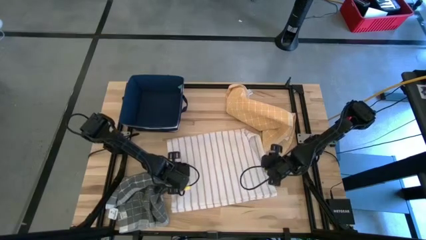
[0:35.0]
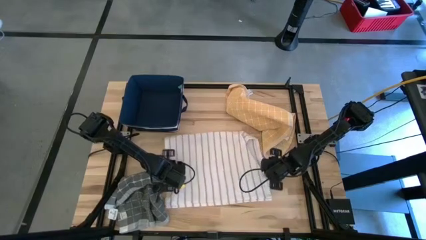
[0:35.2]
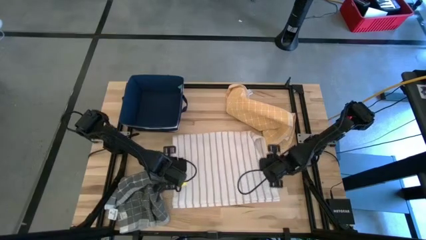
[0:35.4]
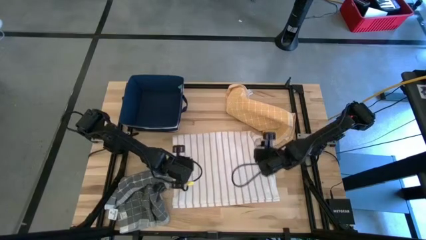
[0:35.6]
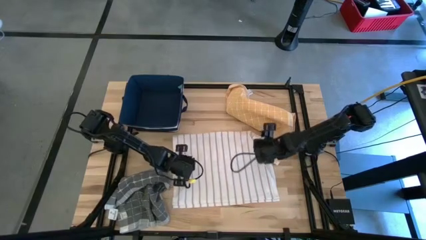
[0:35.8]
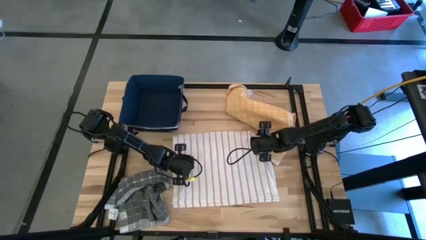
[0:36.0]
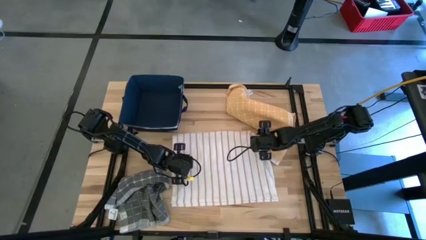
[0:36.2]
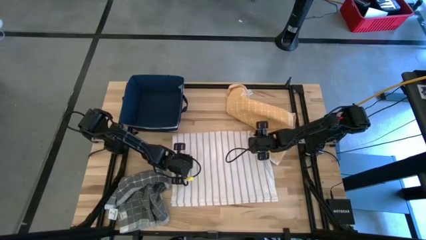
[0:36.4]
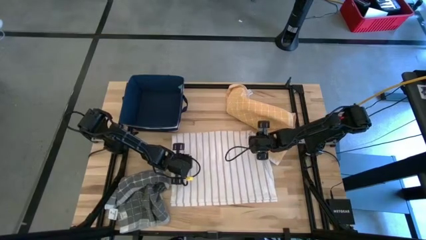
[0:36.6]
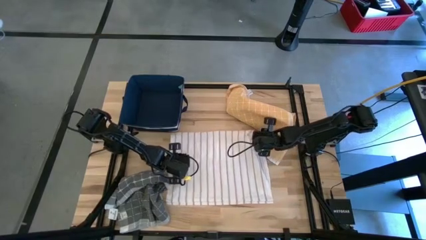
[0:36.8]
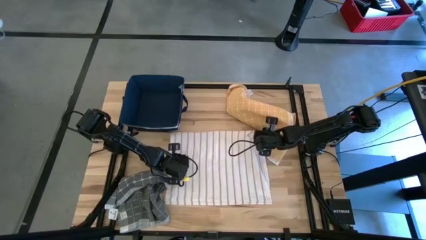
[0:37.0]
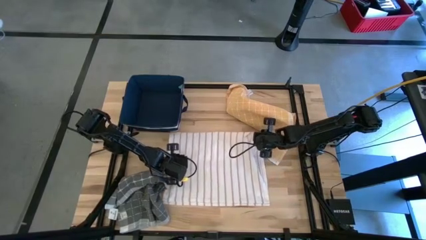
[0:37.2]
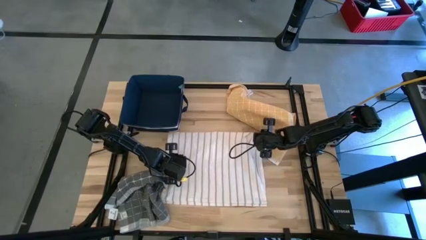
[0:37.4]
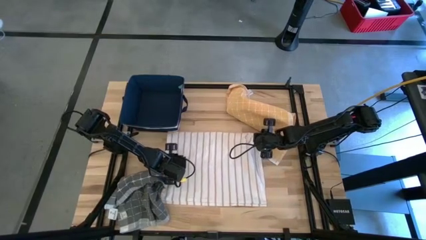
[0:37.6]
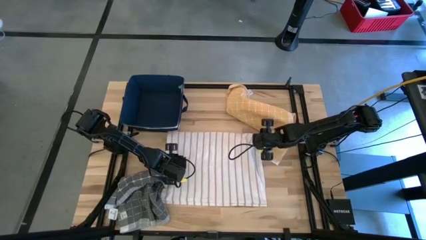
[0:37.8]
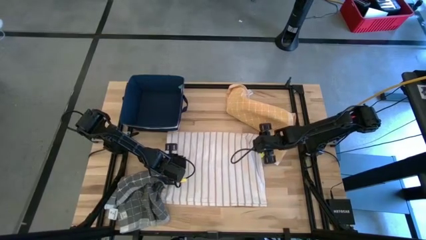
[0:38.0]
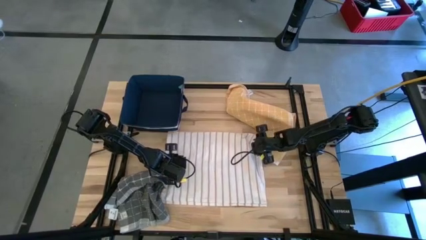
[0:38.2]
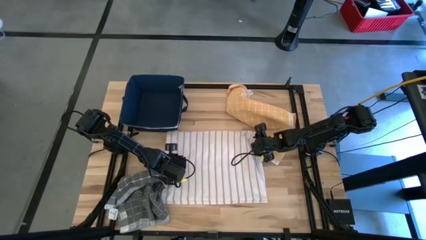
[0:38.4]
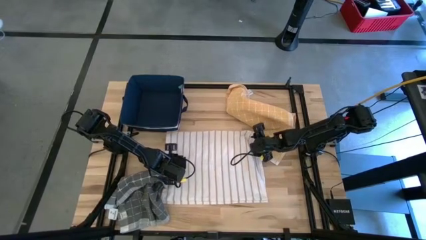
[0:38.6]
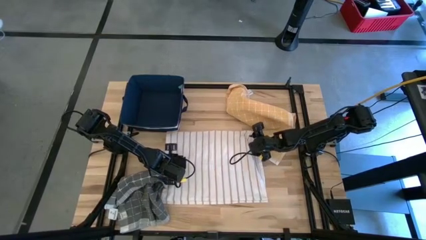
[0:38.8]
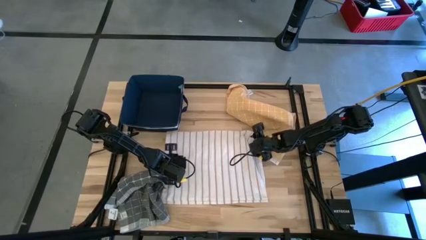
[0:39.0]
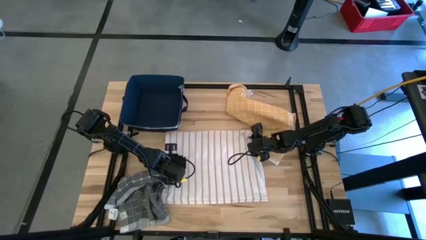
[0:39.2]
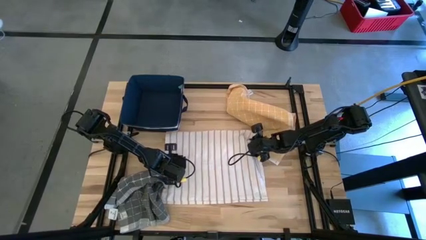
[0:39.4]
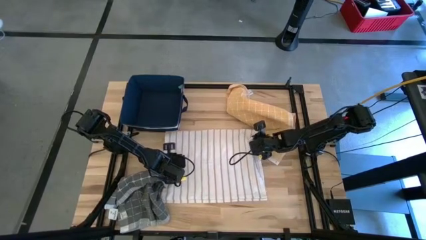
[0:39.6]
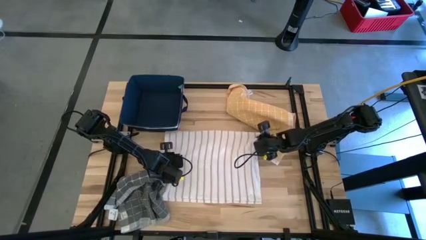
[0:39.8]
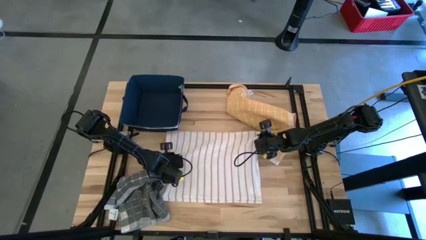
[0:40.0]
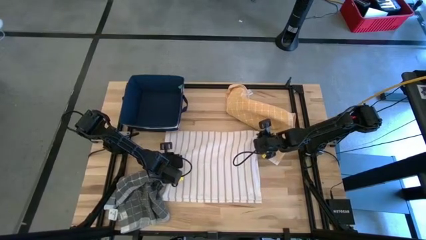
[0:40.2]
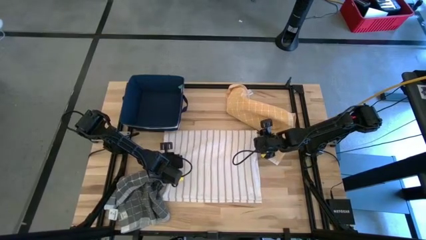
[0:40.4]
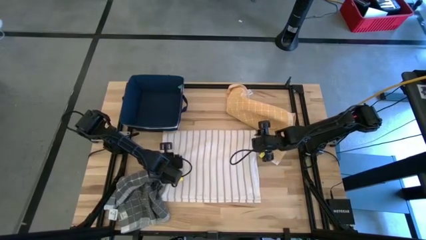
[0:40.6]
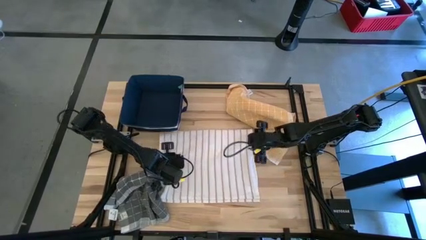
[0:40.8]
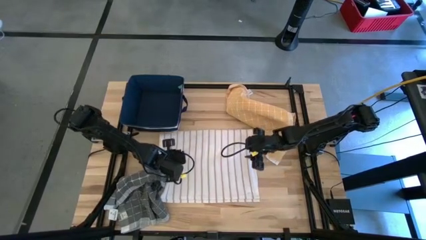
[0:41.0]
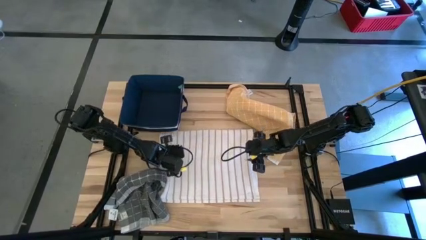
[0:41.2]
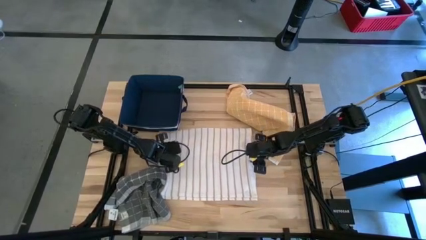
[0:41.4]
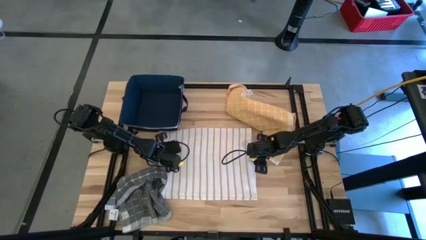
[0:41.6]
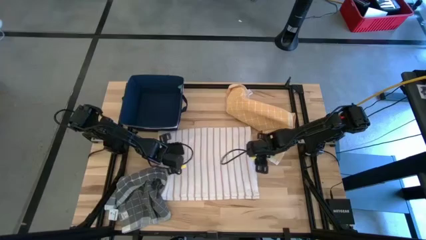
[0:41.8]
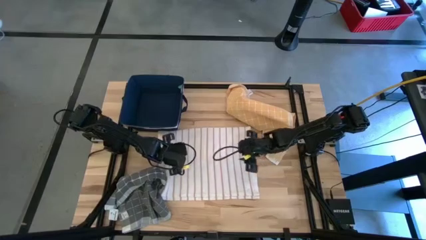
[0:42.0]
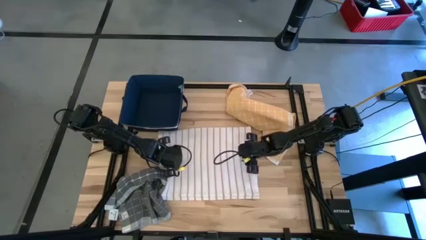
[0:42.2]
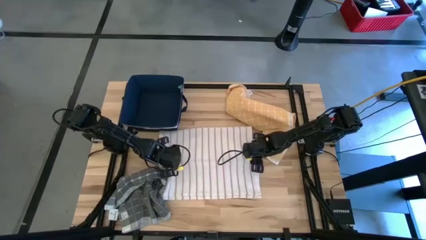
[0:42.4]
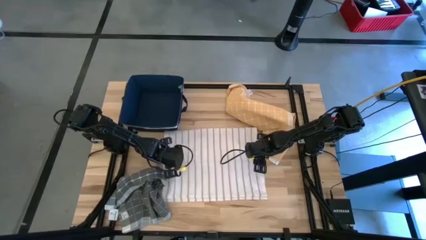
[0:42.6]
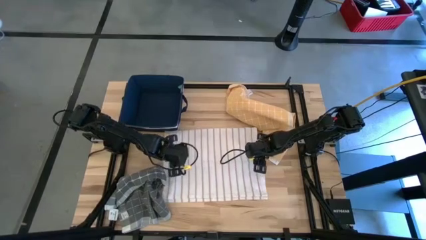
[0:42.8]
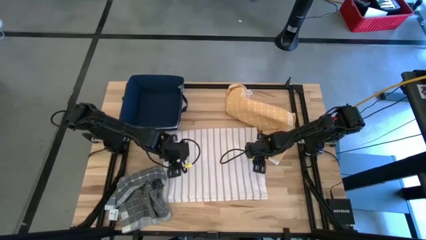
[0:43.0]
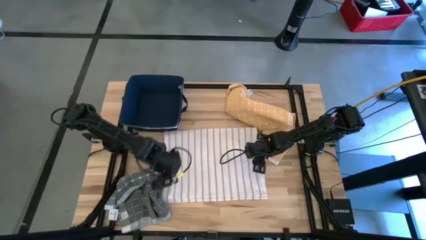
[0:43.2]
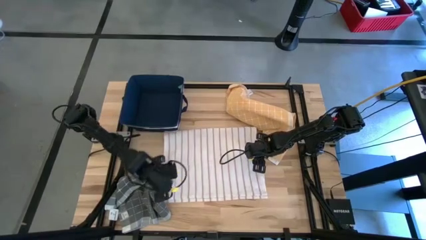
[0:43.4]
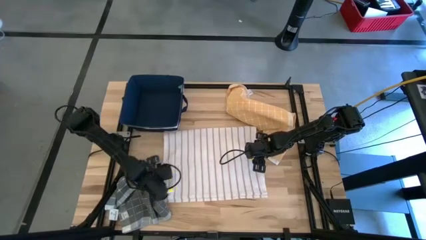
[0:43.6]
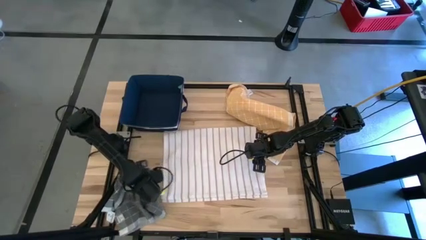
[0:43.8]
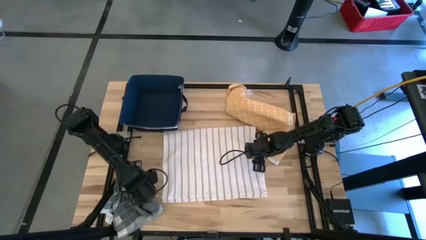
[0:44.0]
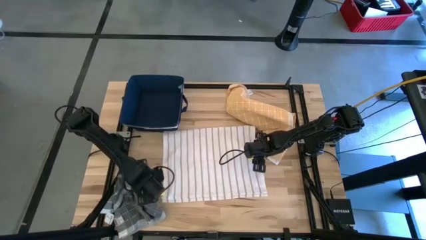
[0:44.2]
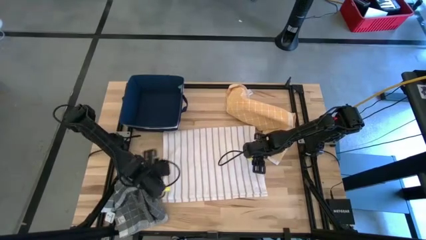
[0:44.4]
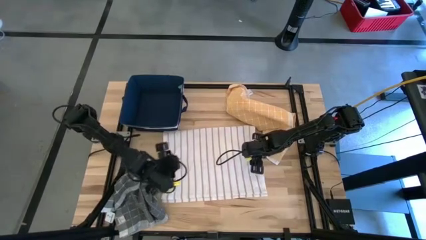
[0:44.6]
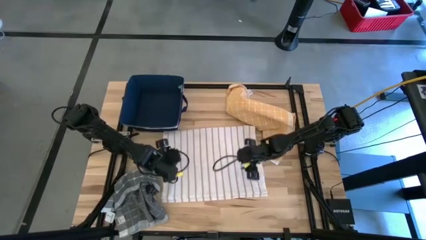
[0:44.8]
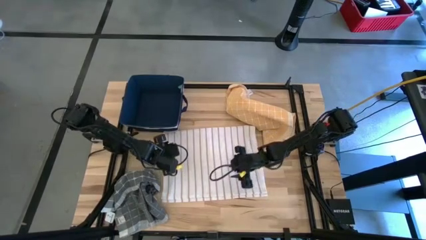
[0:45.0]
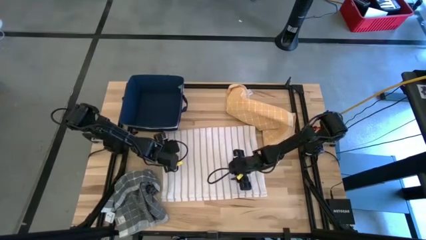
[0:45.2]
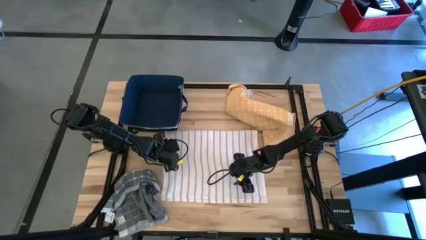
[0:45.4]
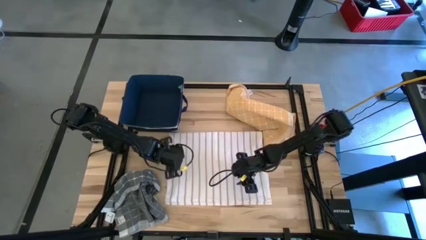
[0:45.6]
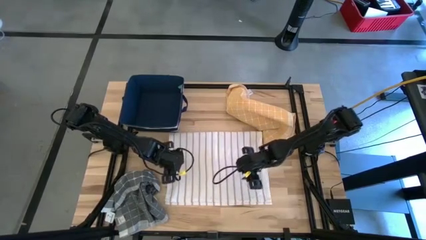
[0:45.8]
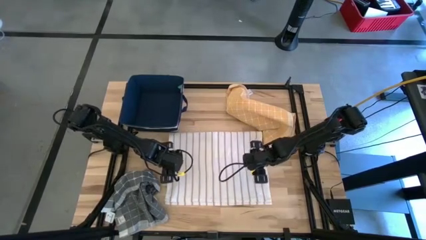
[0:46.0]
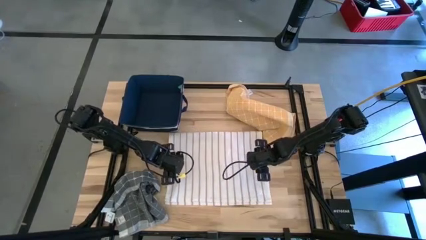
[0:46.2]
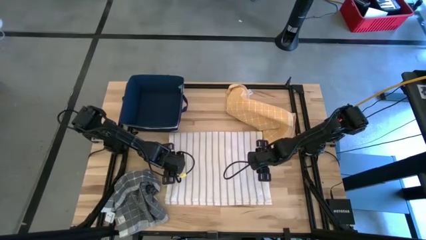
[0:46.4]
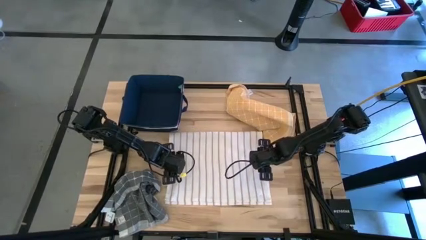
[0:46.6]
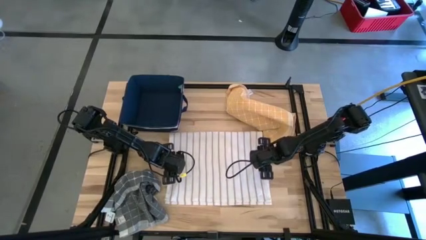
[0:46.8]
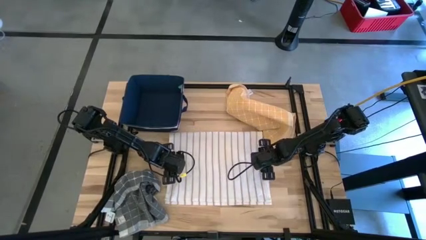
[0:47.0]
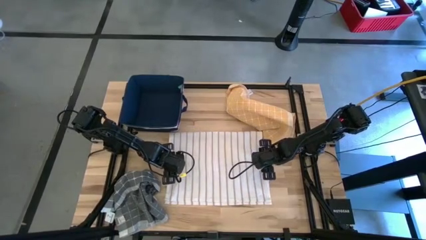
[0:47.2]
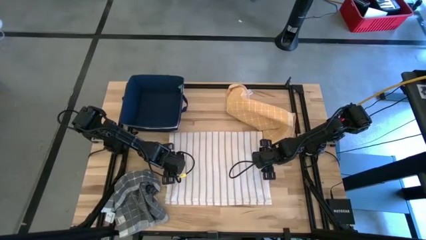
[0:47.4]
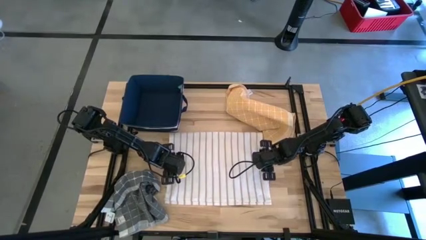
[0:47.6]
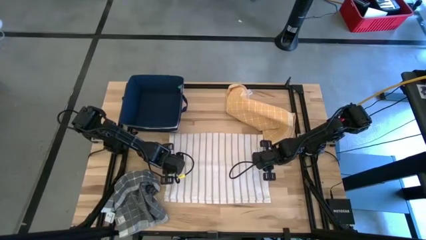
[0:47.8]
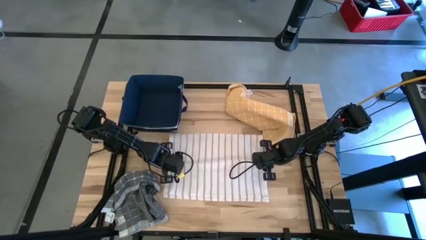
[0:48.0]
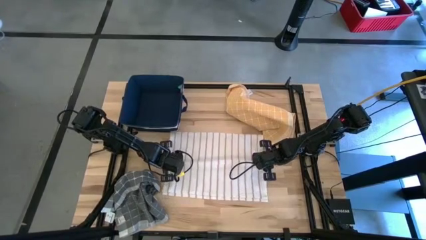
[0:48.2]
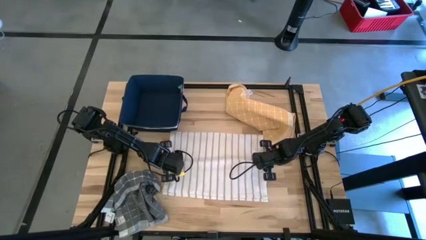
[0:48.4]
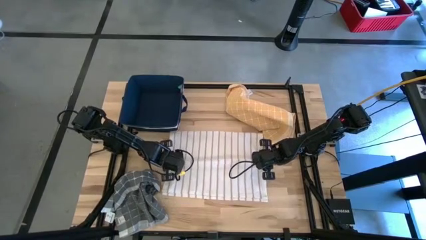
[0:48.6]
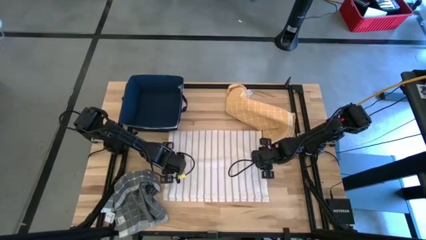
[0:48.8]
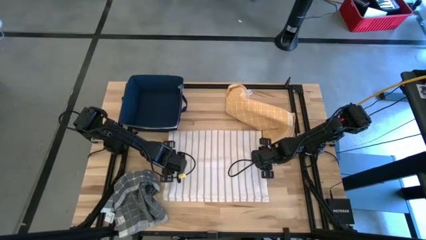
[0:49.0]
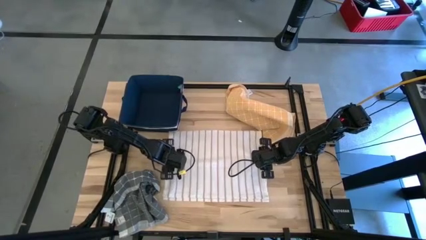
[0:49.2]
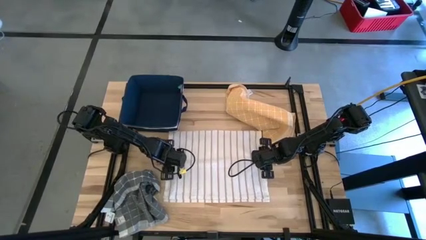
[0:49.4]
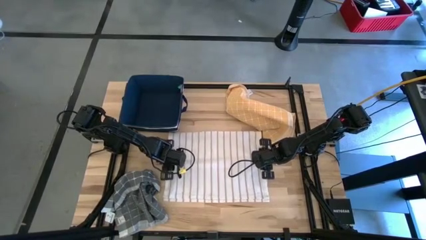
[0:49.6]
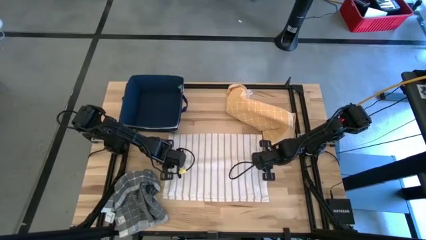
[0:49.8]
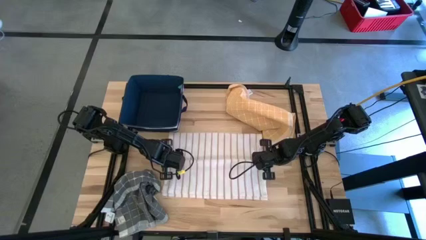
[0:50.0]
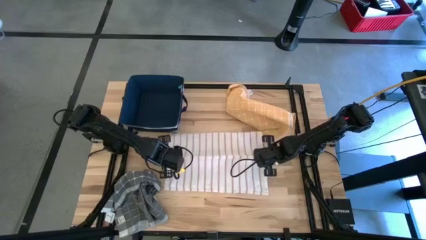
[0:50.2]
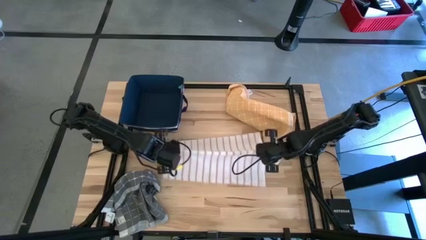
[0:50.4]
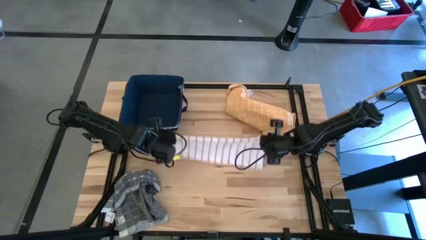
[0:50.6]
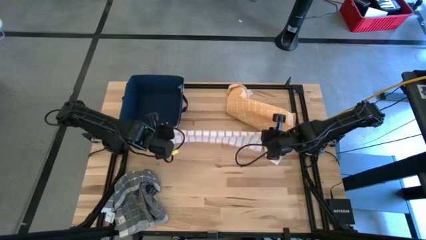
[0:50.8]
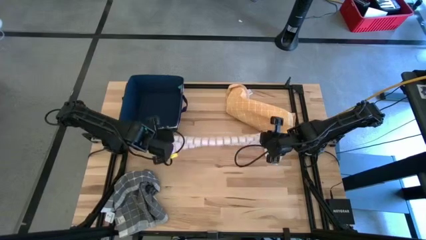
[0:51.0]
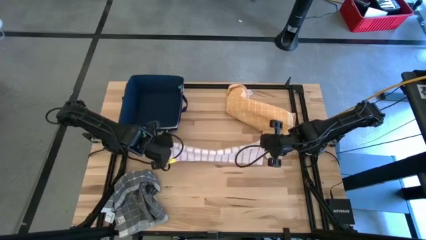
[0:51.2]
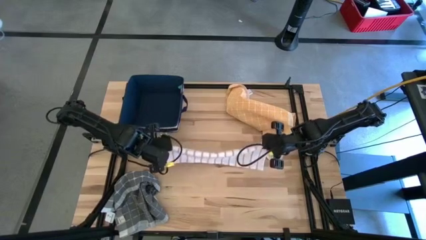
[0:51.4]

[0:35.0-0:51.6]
Task: Fold towel
Fold the white towel

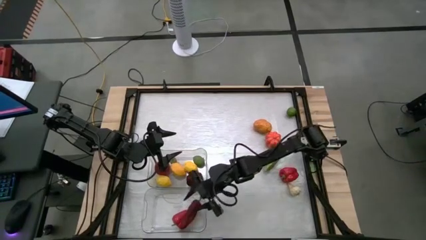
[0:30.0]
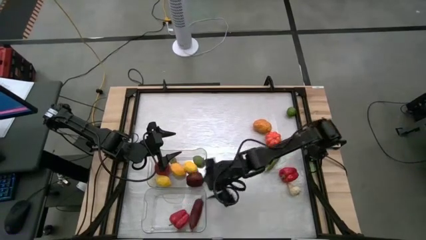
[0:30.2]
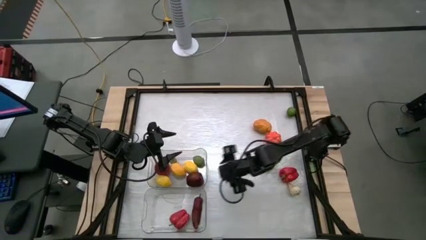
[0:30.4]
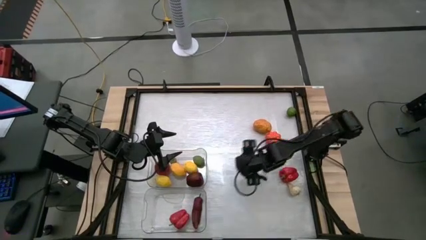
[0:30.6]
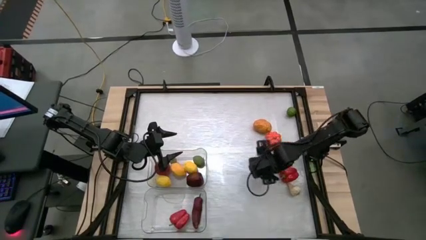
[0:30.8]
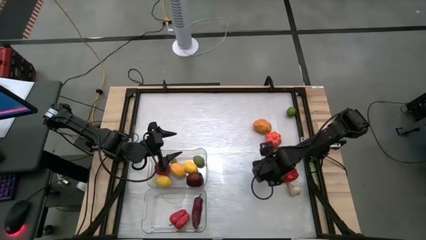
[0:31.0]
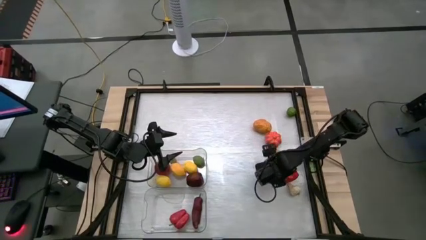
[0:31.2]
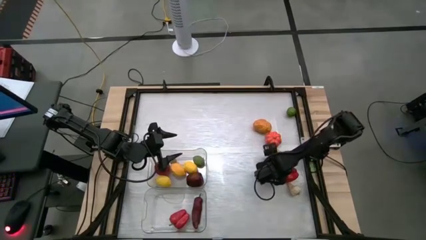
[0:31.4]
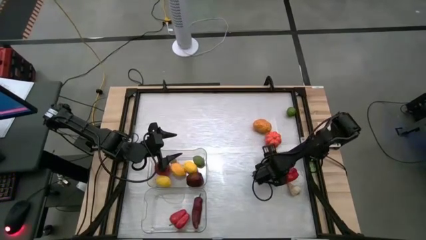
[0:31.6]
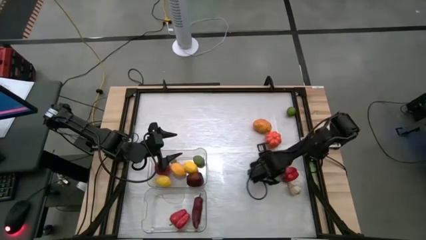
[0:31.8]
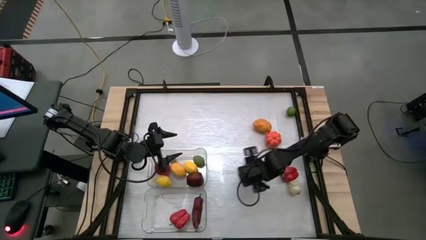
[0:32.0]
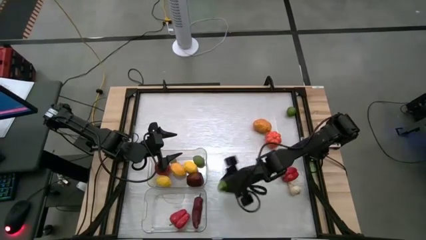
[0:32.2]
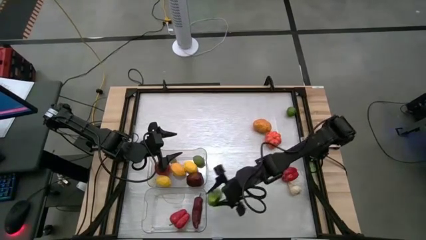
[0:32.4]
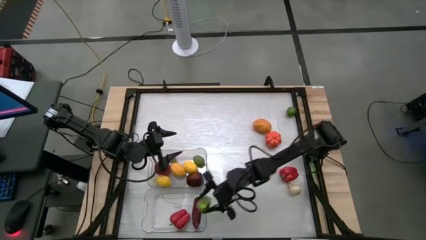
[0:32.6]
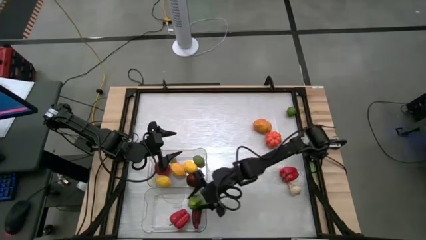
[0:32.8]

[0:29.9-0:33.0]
Task: Sort produce into baskets
Put the green bell pepper into the bottom transparent bin
